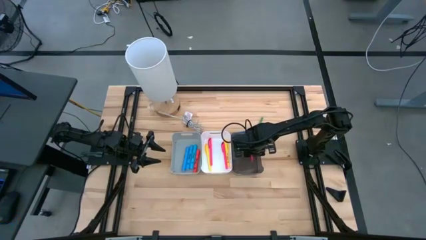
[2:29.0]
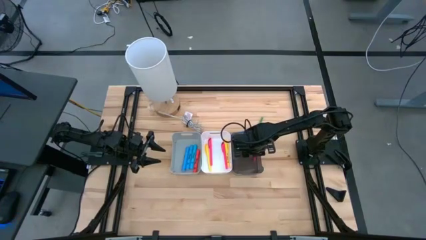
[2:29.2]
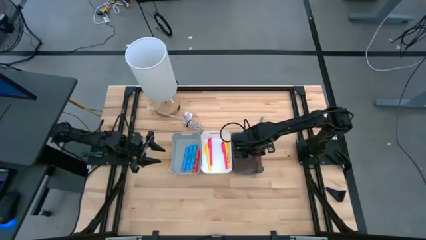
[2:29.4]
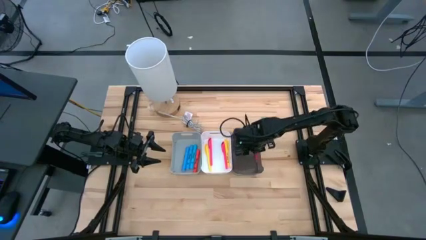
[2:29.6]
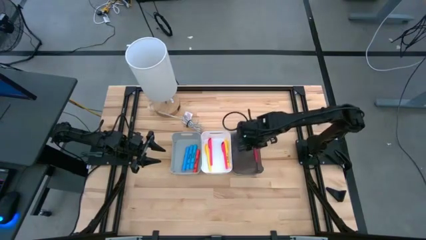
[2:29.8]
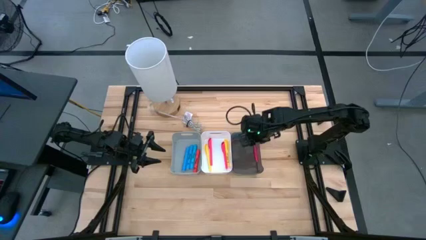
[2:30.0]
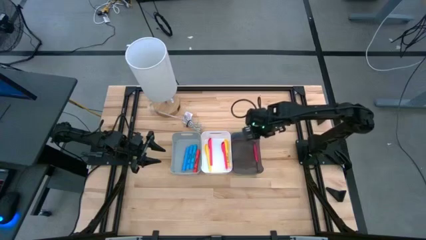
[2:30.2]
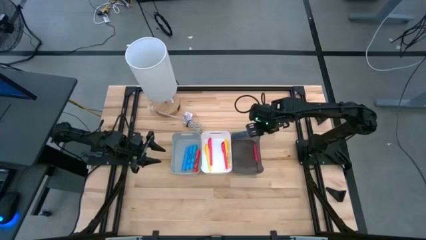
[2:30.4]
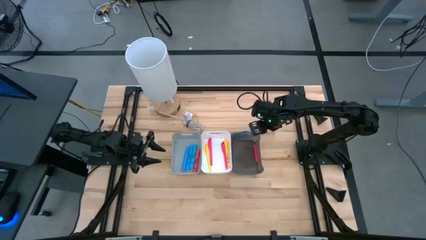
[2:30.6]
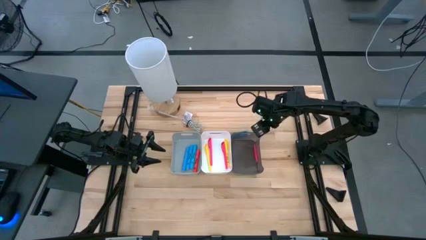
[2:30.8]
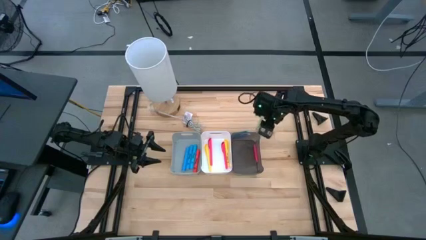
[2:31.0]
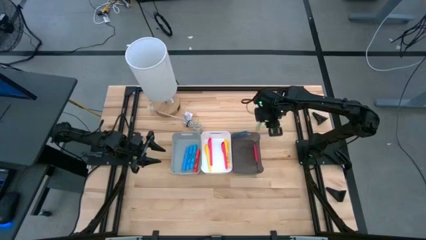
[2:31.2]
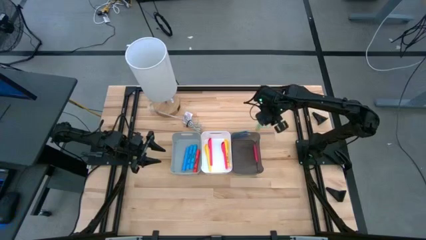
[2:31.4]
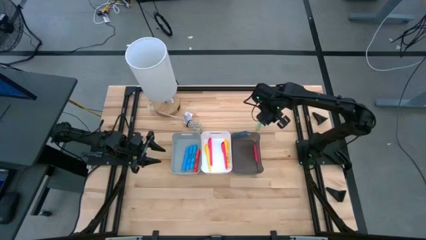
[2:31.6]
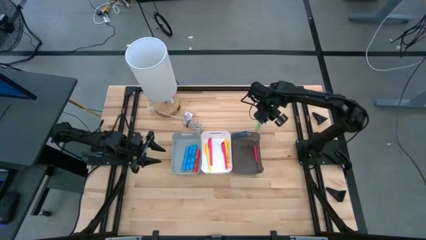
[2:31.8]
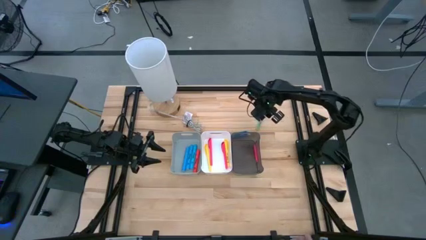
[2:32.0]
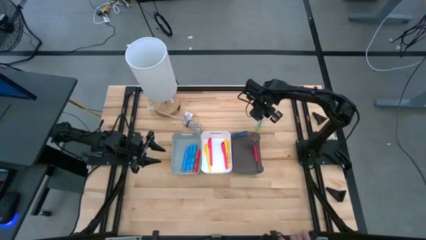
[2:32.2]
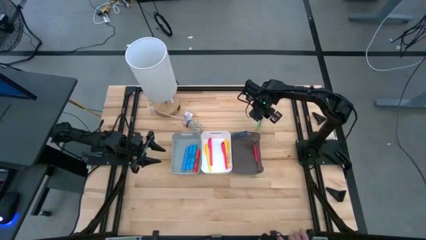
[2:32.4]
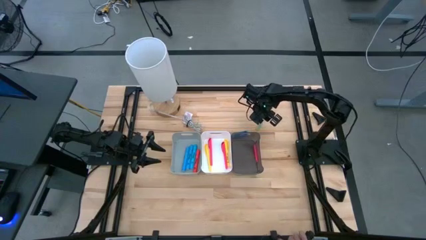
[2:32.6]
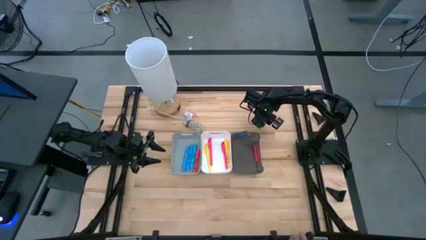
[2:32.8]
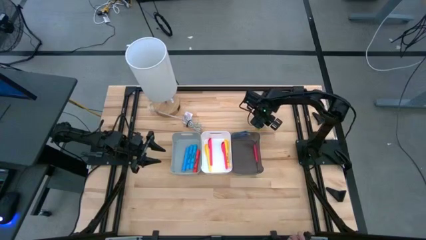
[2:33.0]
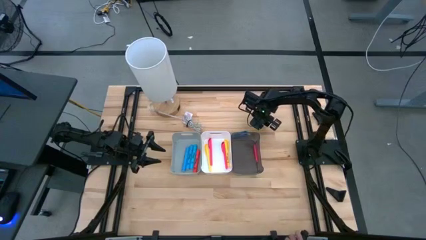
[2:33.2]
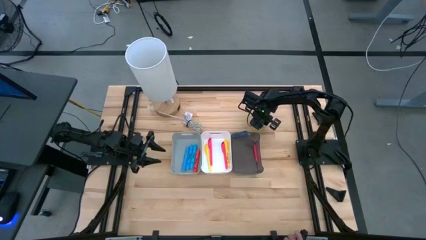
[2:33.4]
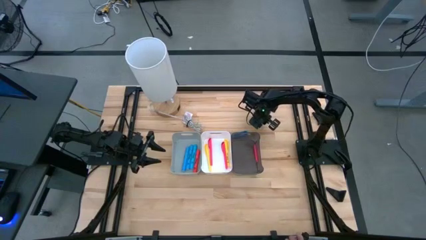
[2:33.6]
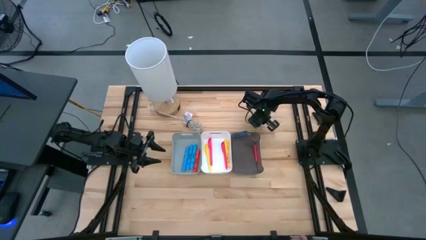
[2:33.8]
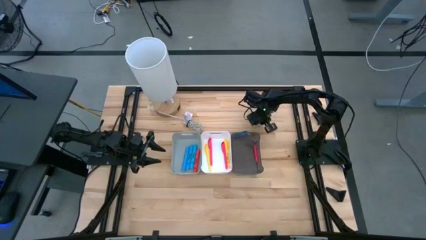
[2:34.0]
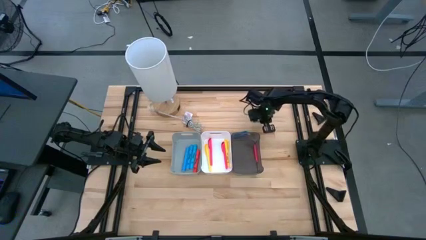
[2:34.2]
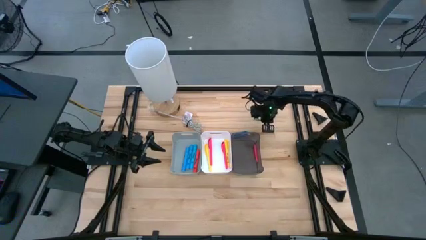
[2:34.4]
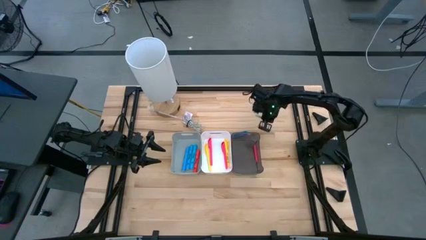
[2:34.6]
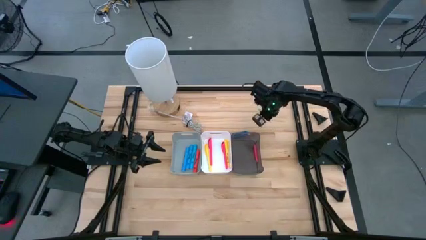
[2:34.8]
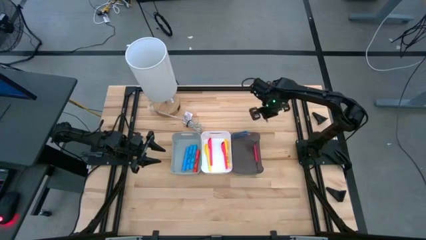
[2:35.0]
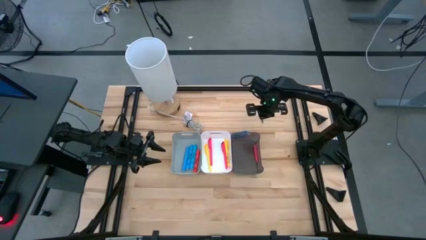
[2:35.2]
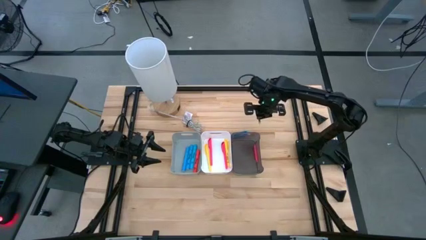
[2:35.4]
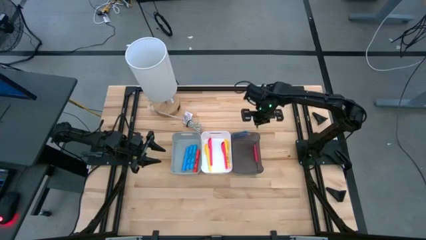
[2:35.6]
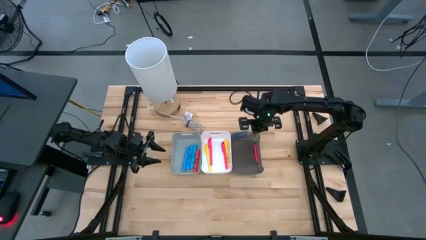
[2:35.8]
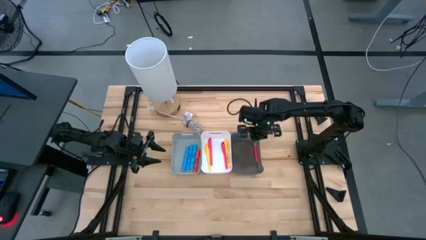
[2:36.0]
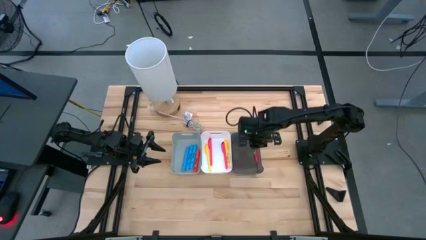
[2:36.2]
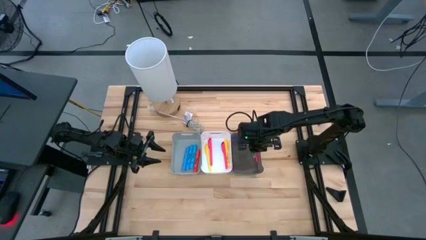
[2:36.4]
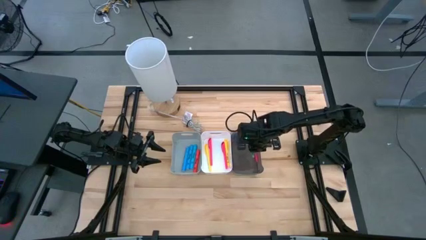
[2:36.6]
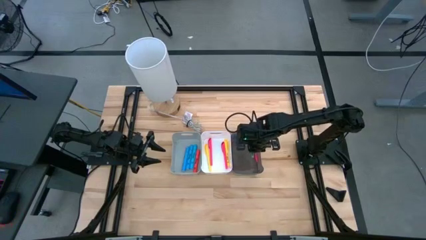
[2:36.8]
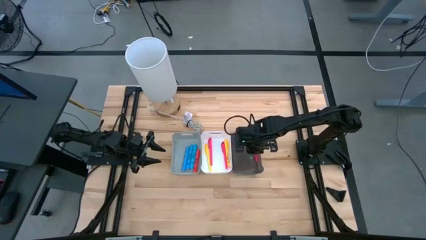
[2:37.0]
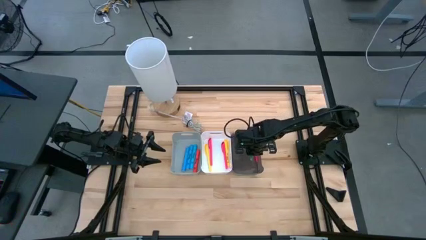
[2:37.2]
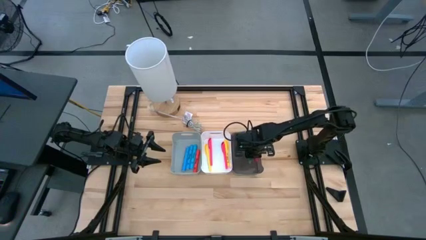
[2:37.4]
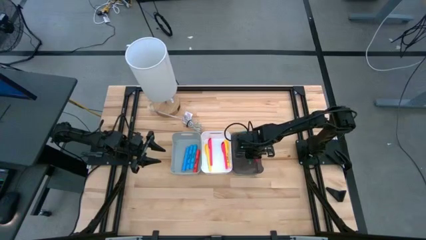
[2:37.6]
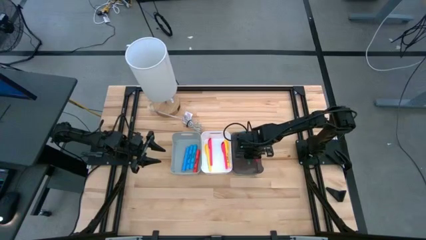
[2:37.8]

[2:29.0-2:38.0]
Task: Pick & Place Markers
Put the green pen into the black bin

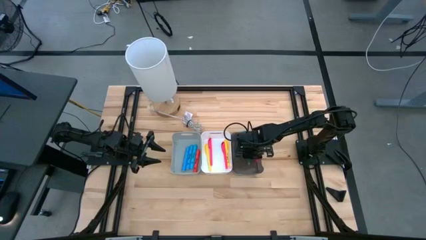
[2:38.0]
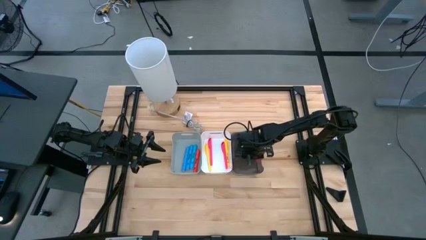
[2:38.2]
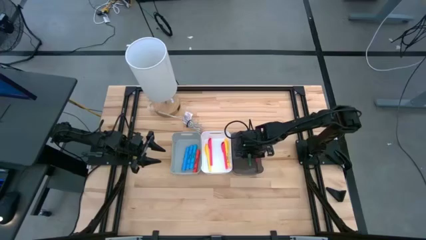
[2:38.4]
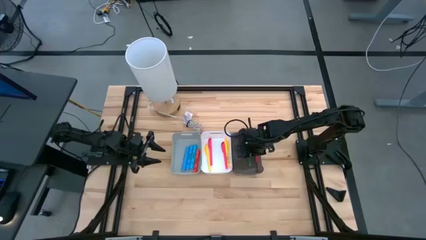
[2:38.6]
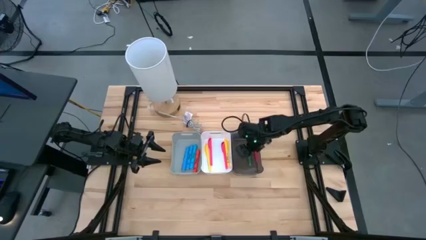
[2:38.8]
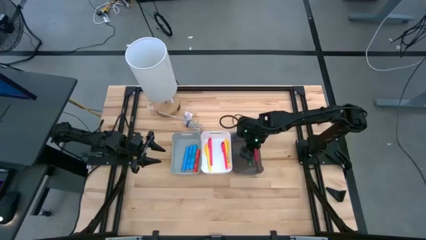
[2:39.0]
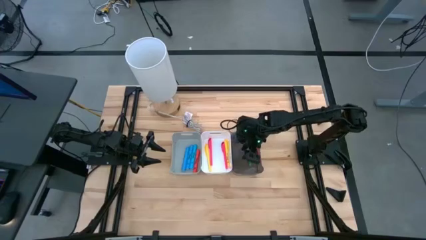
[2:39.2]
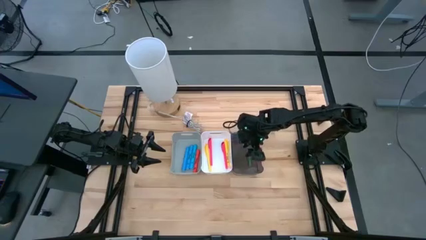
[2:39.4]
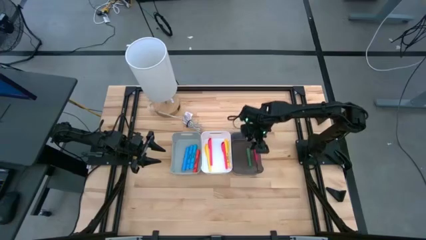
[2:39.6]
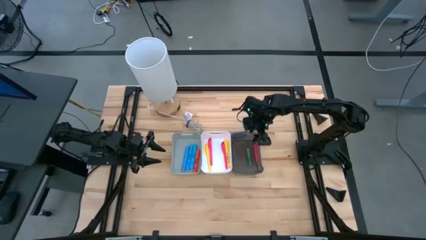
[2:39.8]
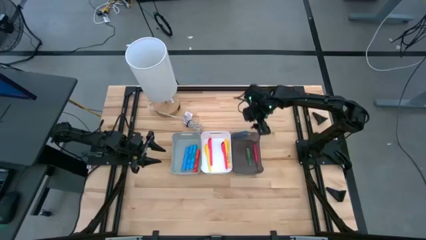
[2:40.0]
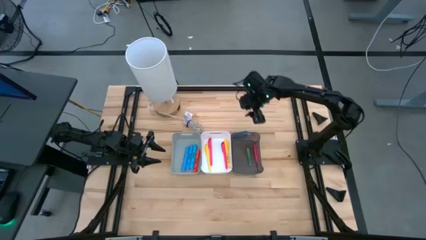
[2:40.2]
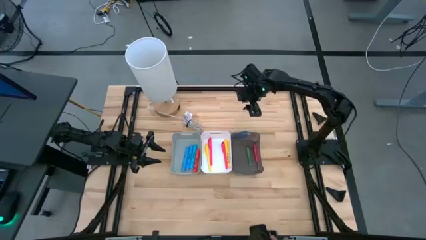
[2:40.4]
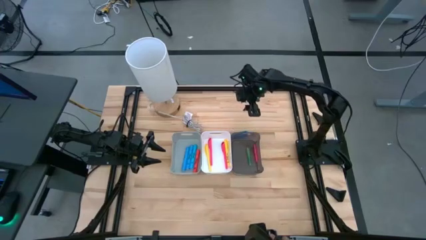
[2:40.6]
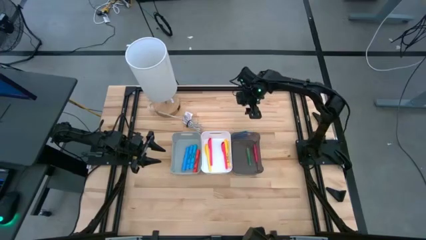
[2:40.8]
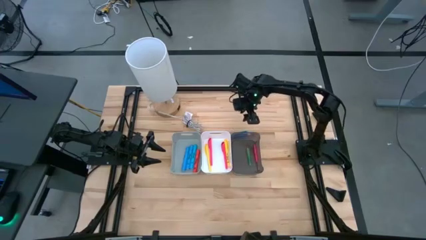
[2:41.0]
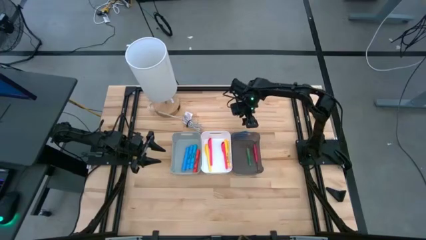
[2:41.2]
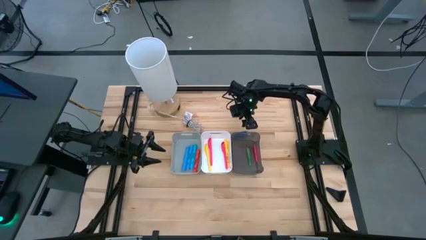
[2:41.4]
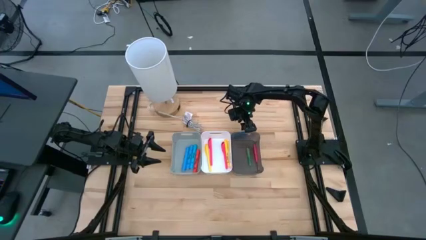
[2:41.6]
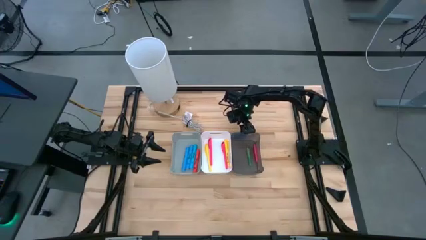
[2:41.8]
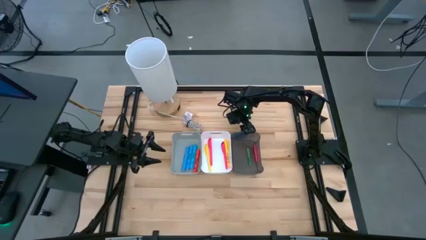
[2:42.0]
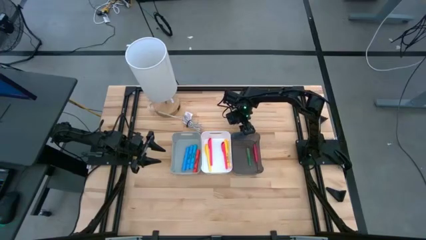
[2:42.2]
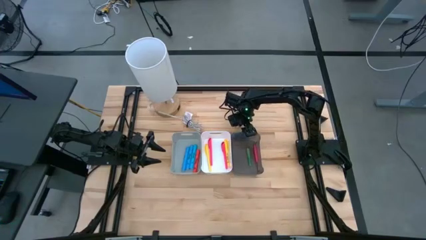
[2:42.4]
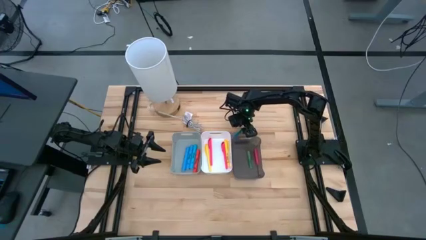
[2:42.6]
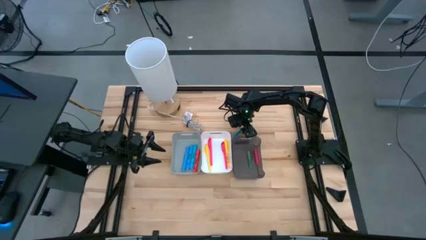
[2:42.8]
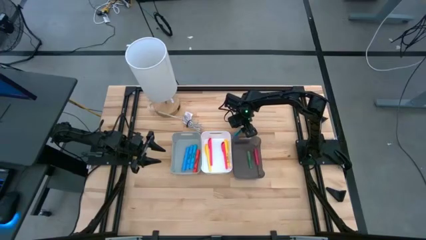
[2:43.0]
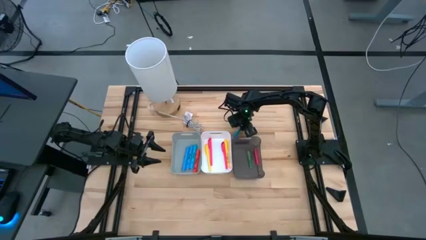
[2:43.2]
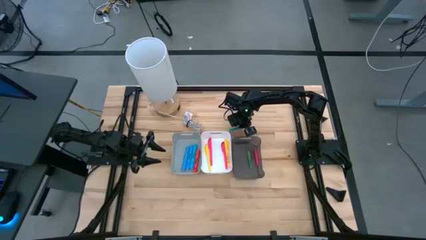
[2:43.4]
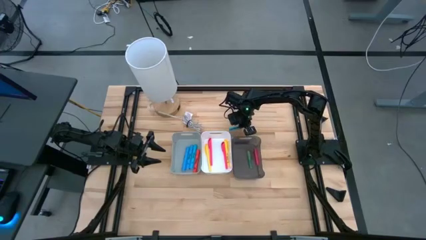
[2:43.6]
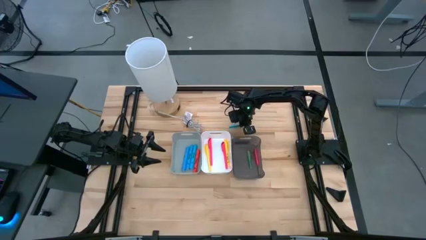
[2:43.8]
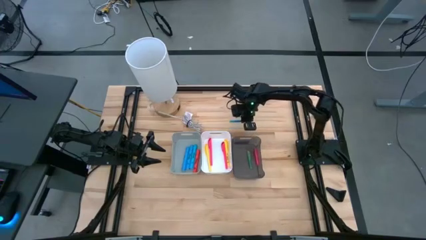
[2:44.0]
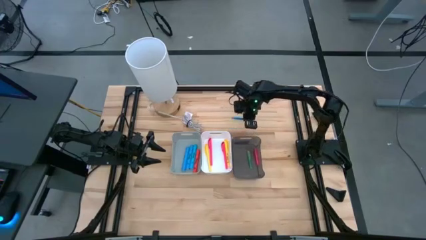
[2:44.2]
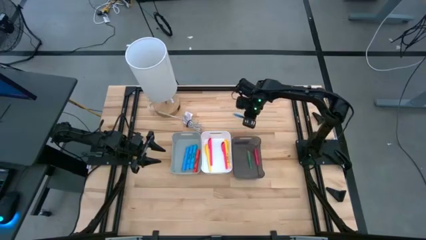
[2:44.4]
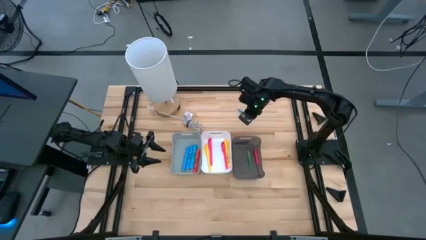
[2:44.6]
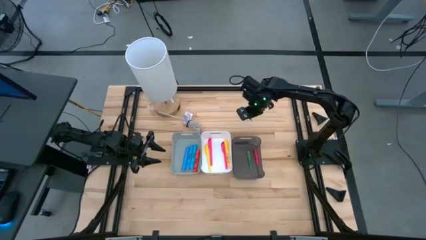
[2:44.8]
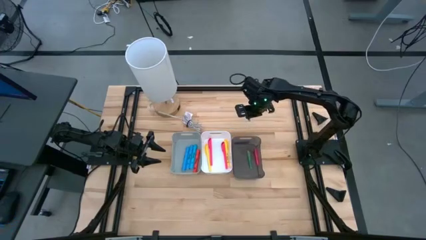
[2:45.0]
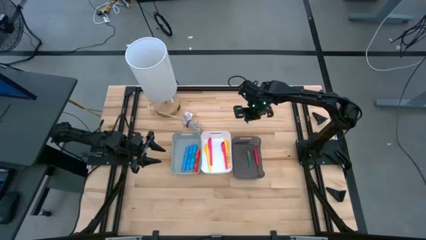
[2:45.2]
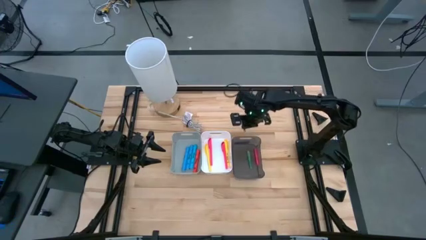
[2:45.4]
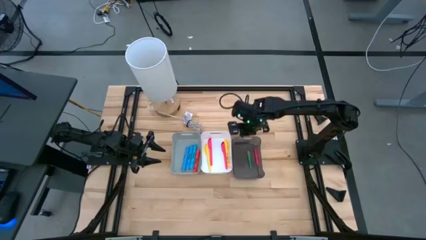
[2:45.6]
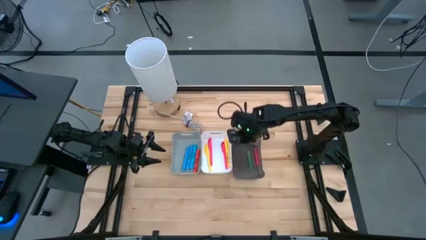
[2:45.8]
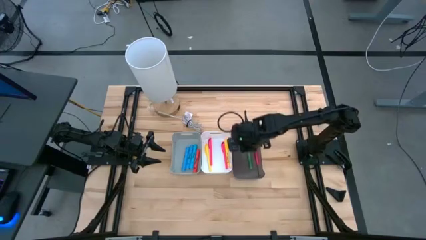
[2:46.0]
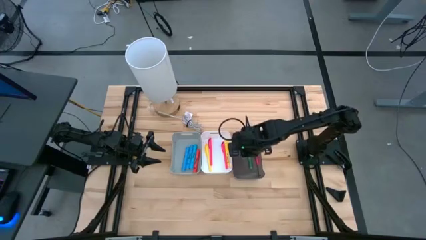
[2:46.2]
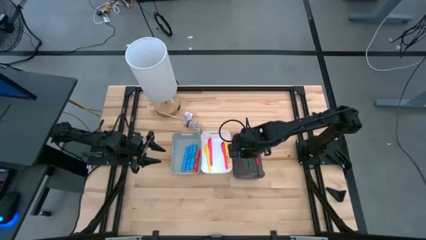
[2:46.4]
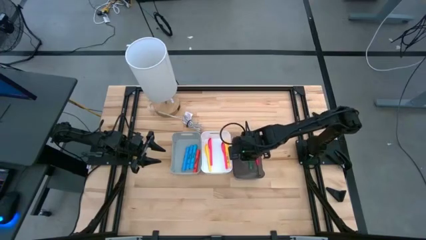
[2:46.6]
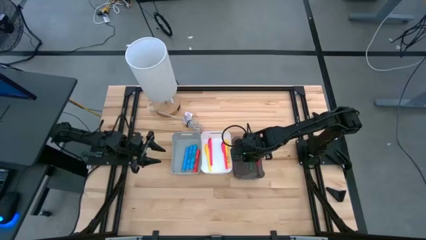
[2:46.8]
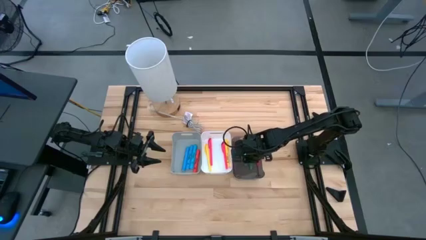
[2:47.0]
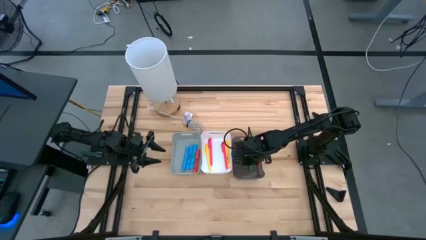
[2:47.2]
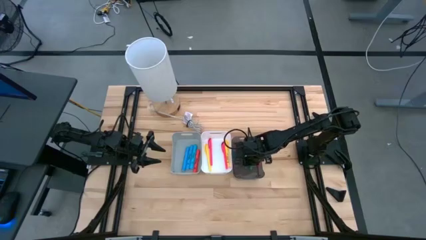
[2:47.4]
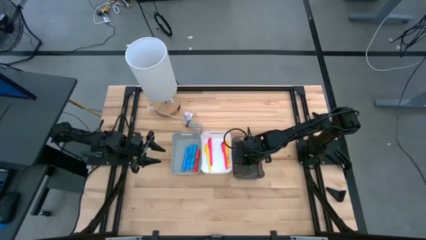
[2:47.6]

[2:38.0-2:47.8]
Put the blue pen into the black bin
